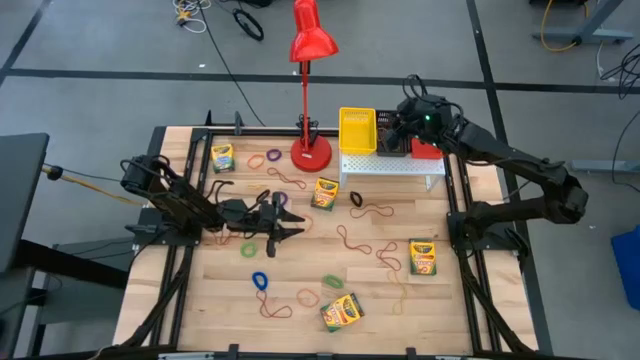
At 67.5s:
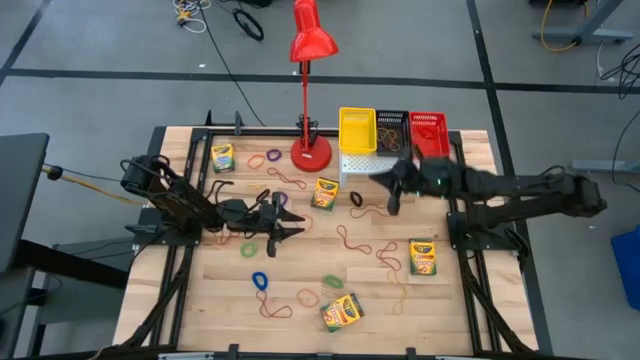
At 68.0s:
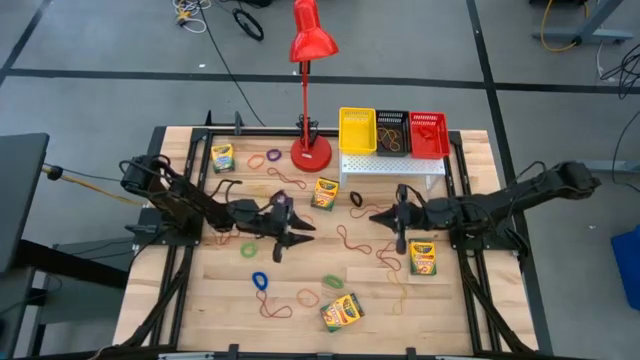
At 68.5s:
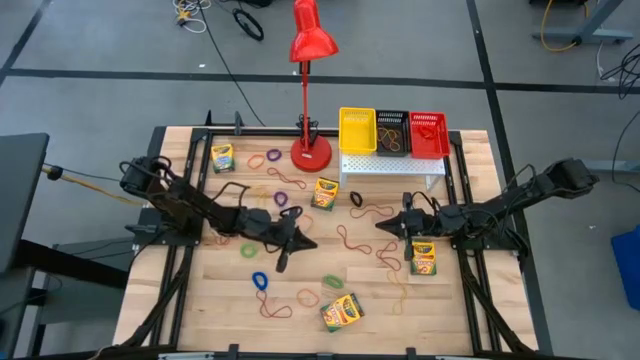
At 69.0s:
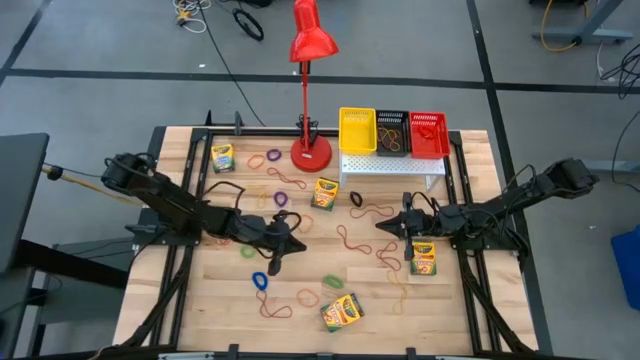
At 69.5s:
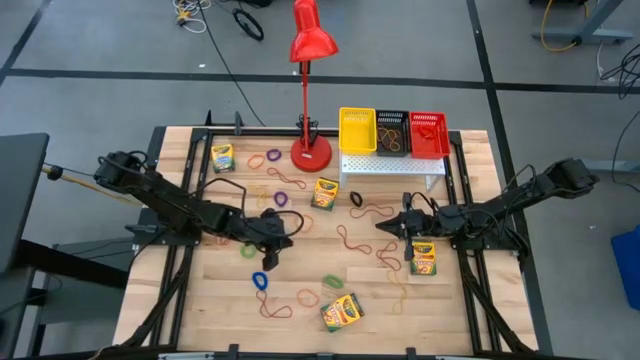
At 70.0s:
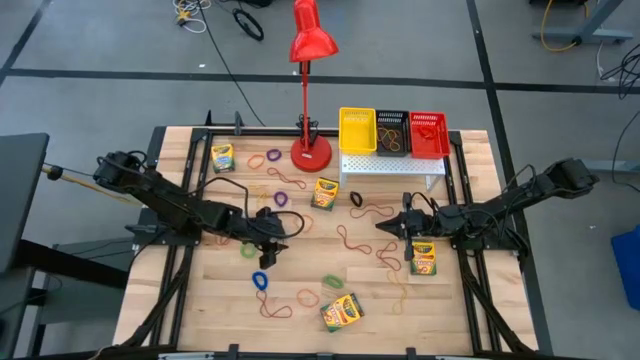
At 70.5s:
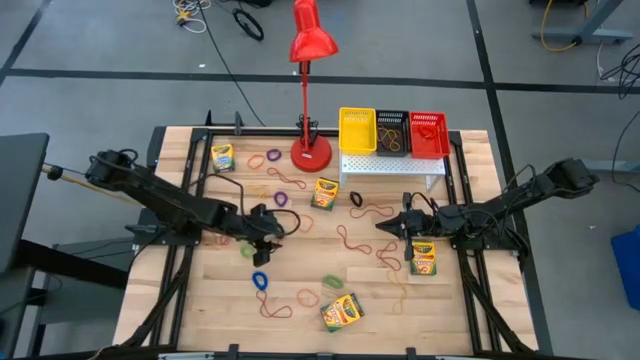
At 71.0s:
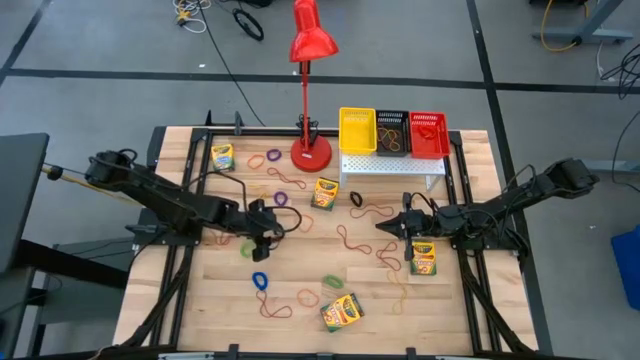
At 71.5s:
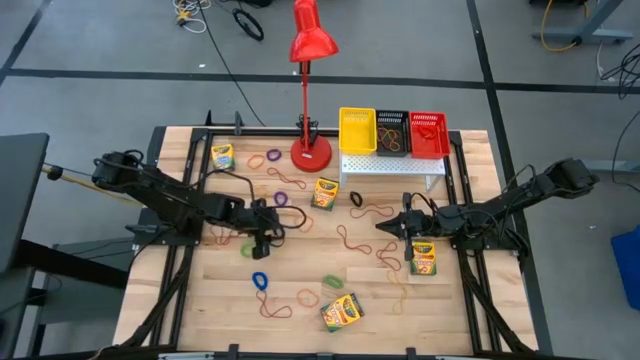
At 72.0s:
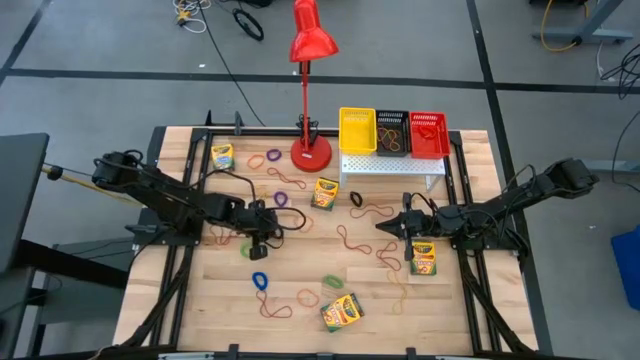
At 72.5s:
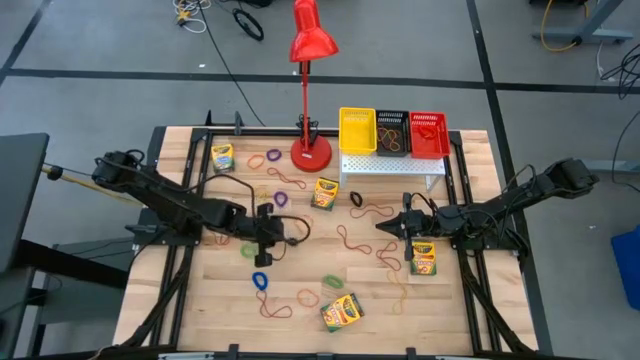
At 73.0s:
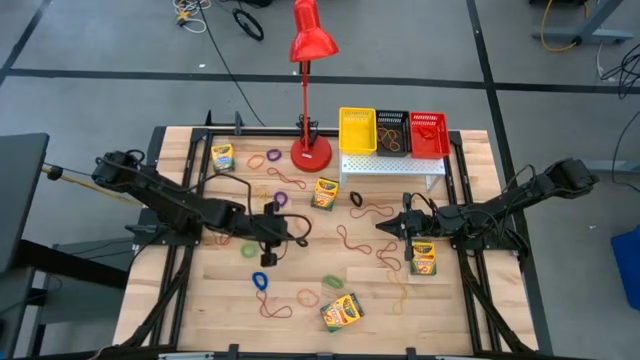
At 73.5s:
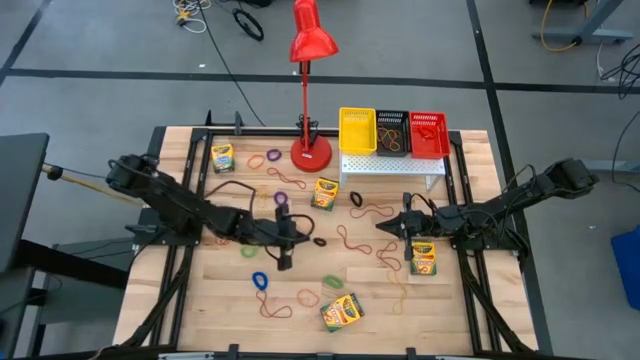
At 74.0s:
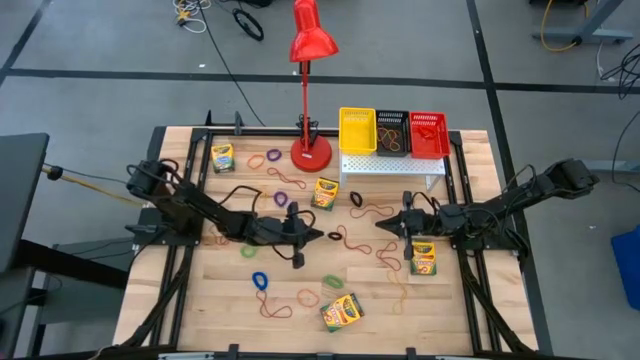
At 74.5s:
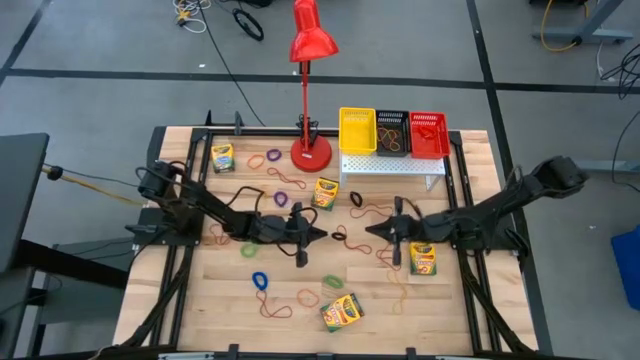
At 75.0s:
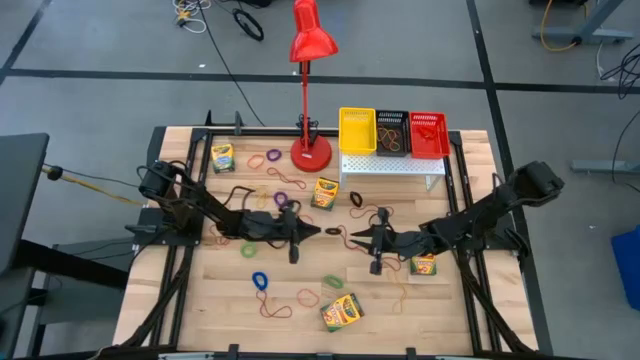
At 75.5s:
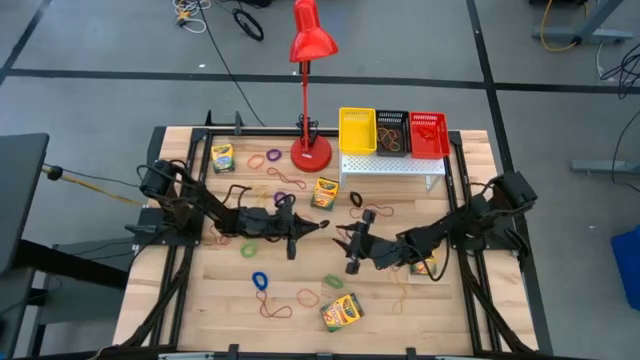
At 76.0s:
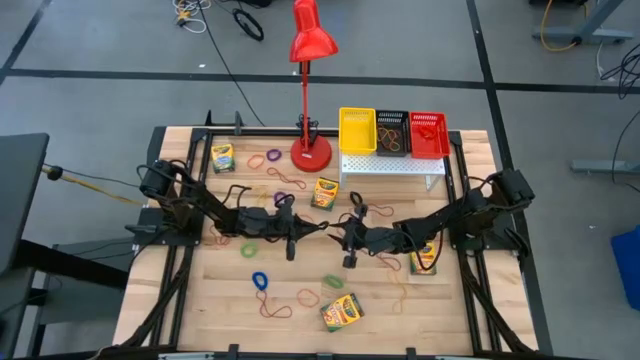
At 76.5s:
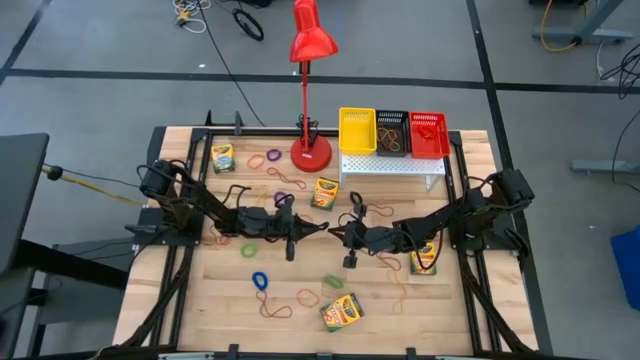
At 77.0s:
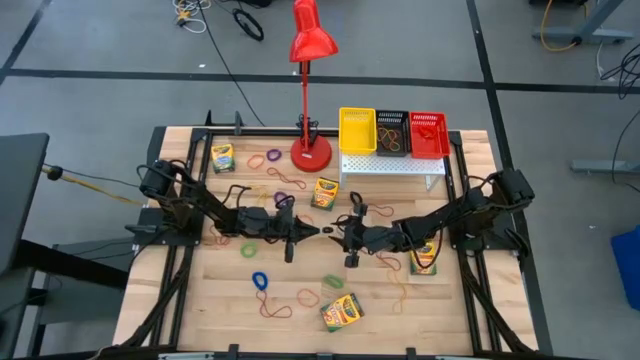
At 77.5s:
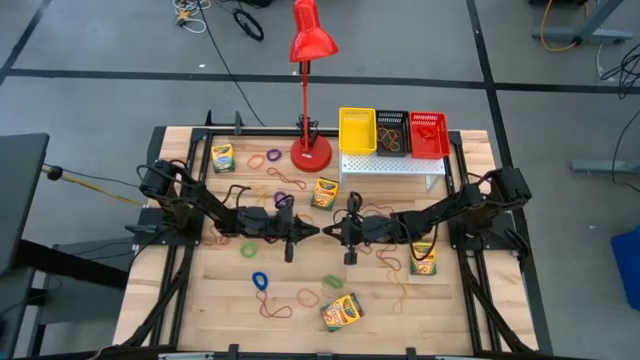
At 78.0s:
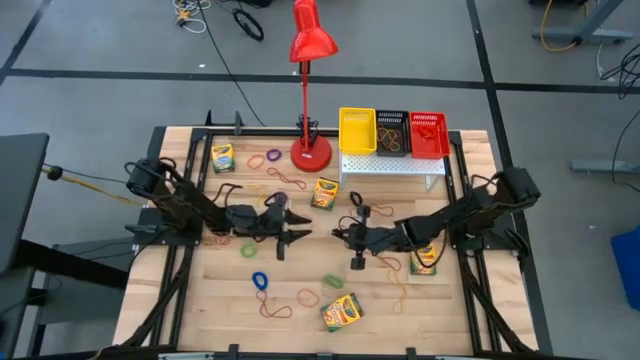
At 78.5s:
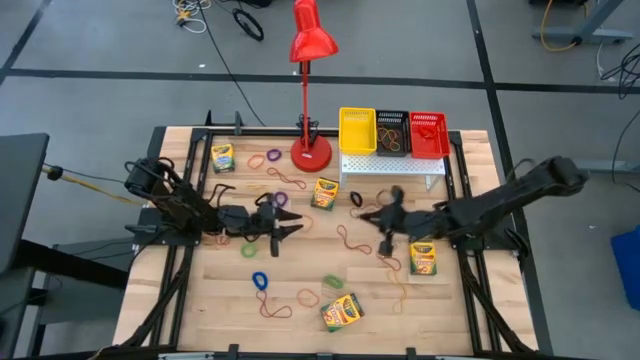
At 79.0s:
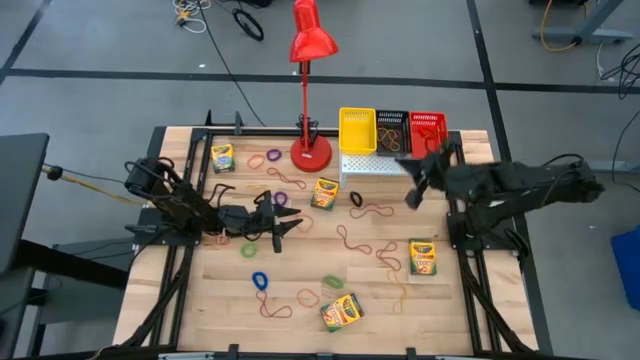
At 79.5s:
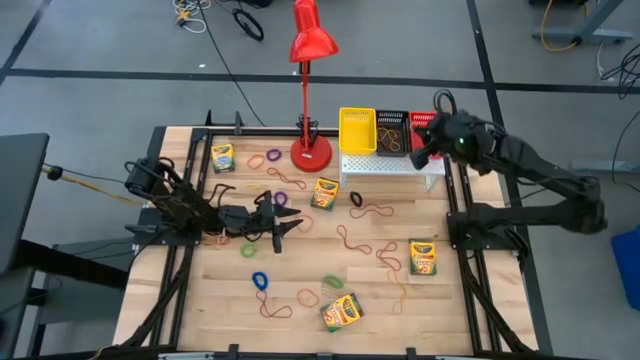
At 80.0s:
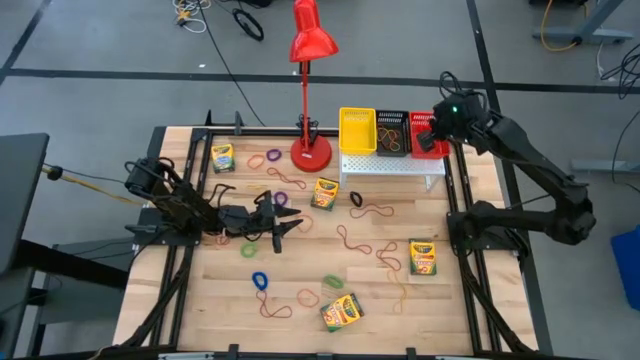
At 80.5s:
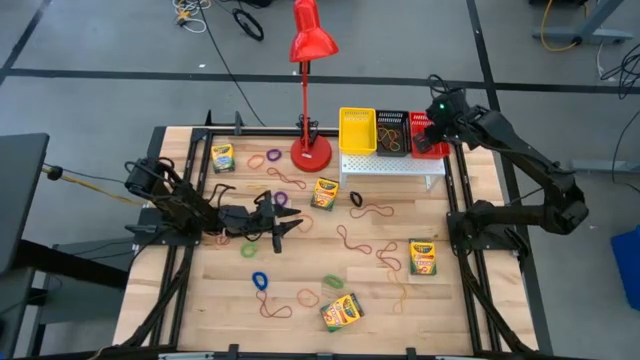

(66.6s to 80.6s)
Task: Pick & Place Office Desk Supplies
Put the black spring keychain into the red bin on the shelf

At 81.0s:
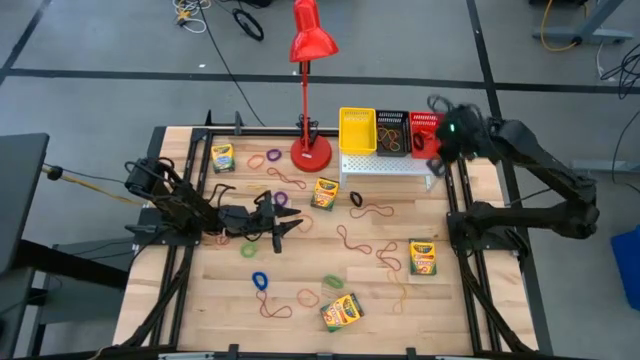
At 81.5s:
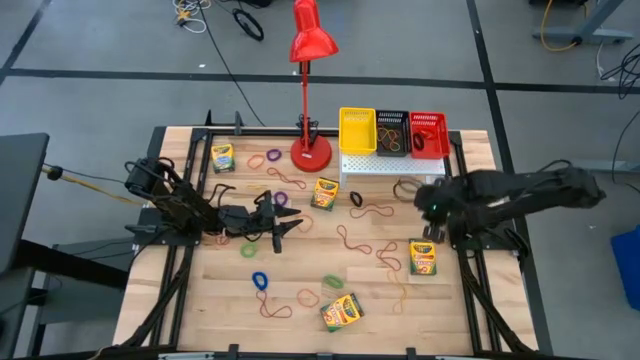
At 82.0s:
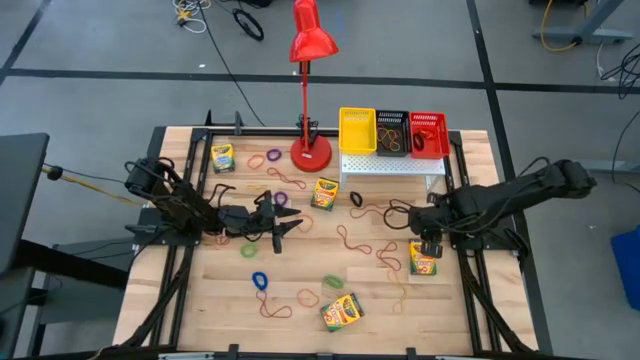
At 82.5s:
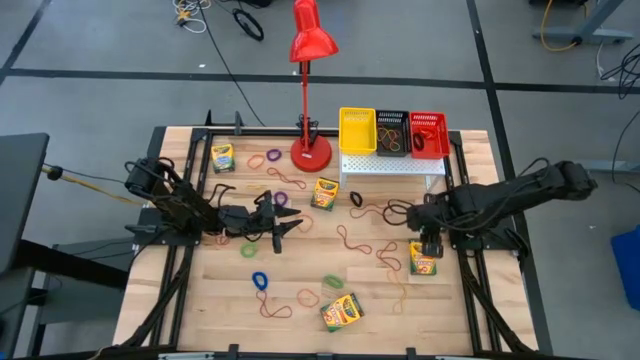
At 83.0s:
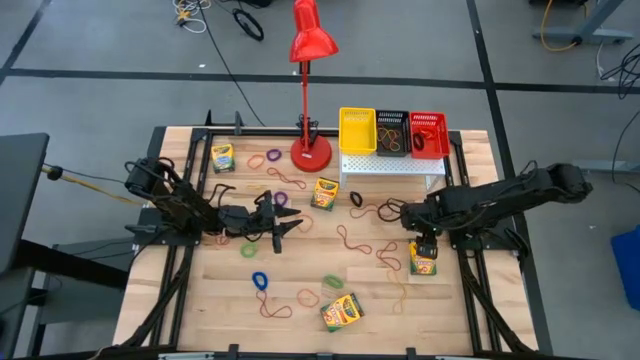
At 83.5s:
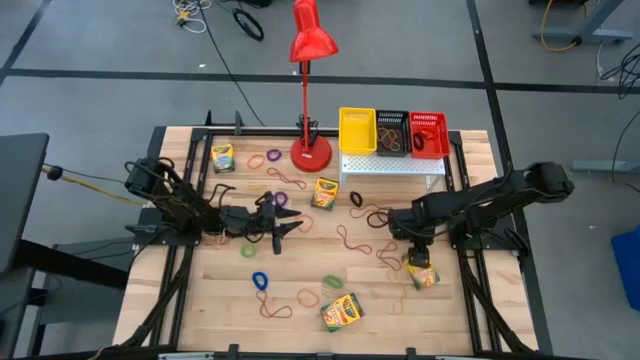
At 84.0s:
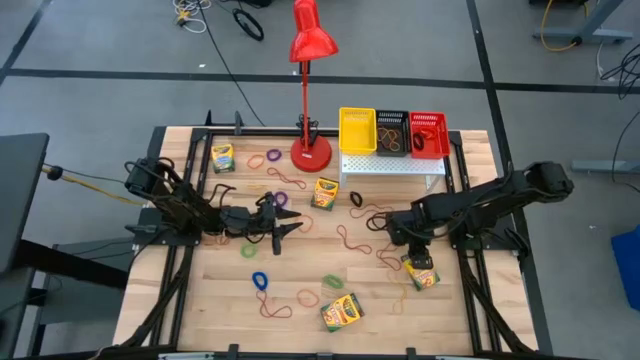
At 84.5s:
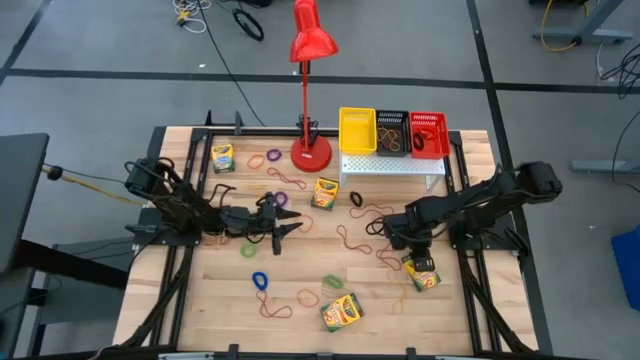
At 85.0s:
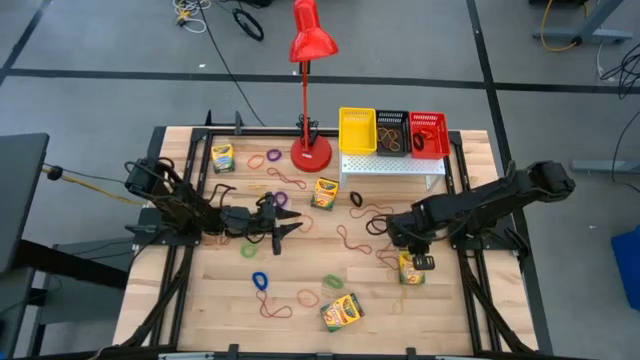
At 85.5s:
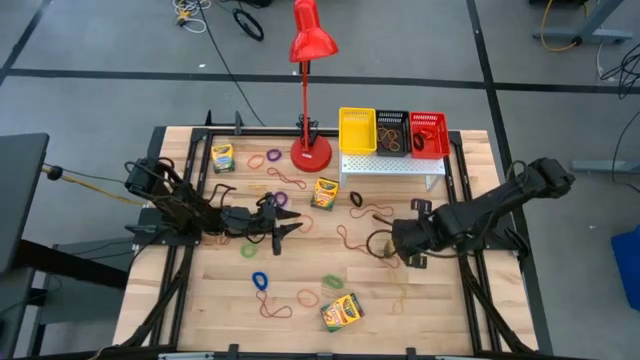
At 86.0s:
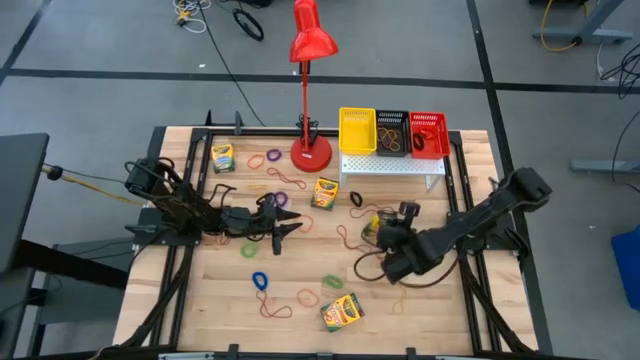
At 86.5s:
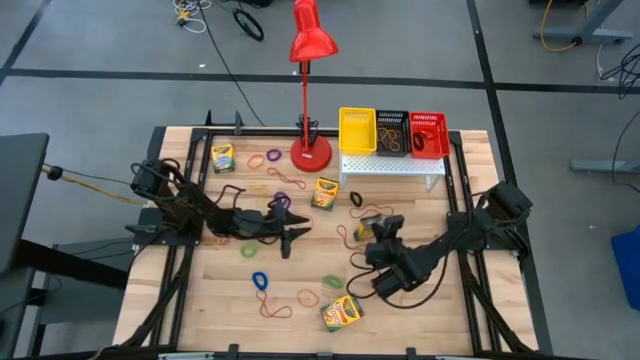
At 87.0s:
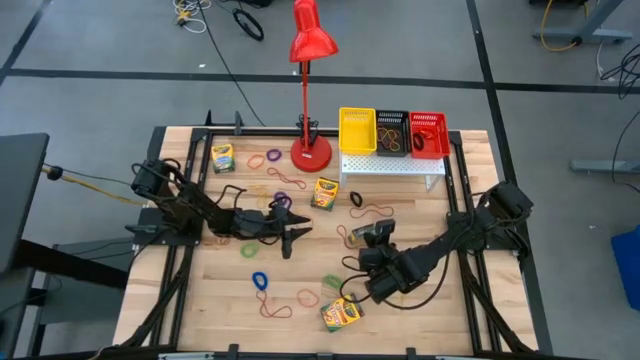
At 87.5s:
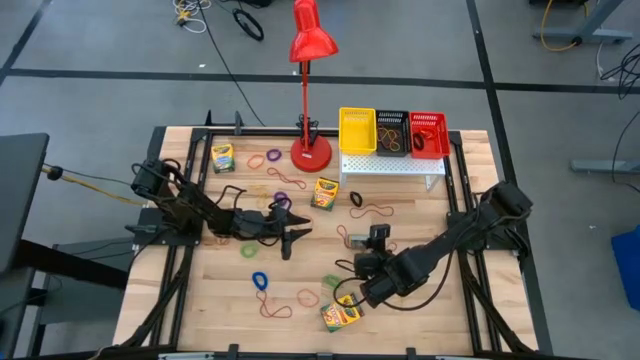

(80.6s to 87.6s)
Put the crayon box into the yellow bin on the shelf

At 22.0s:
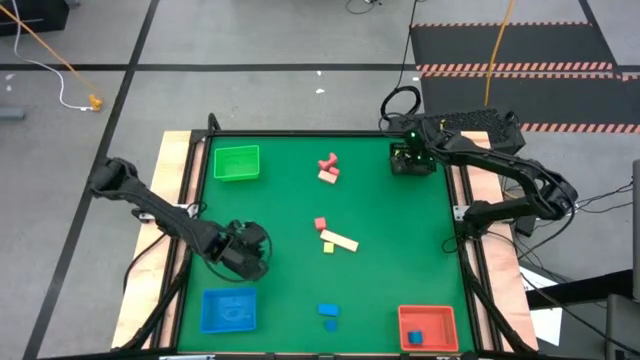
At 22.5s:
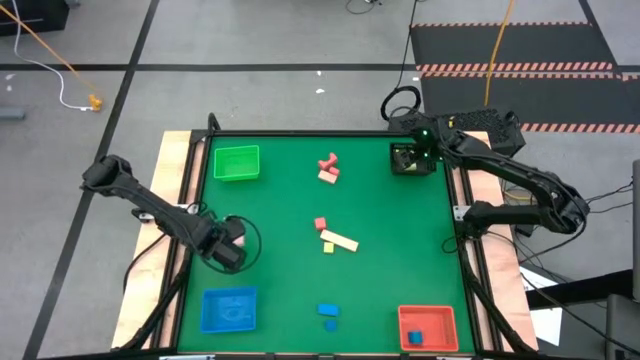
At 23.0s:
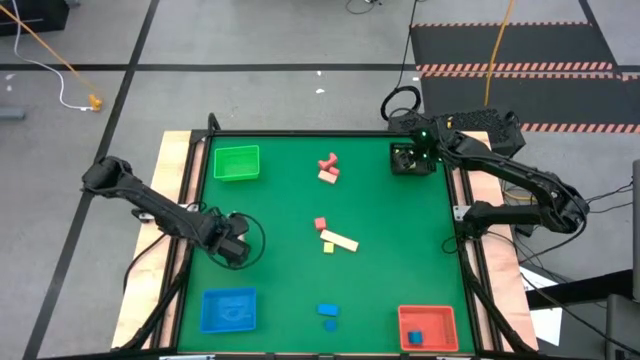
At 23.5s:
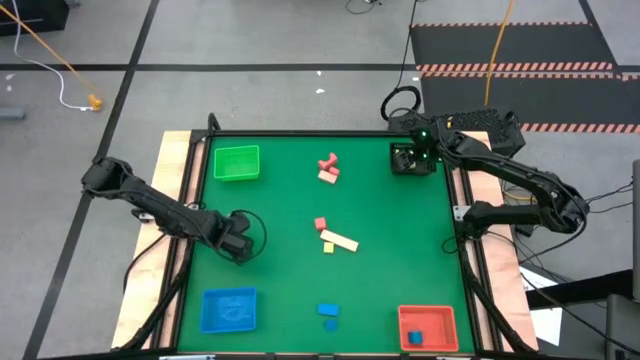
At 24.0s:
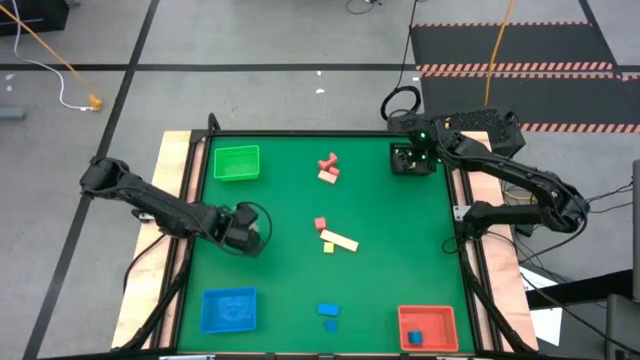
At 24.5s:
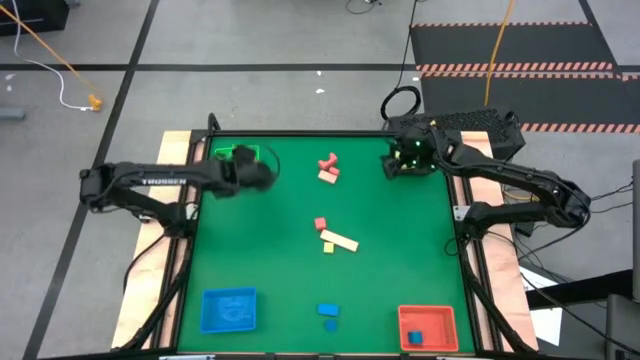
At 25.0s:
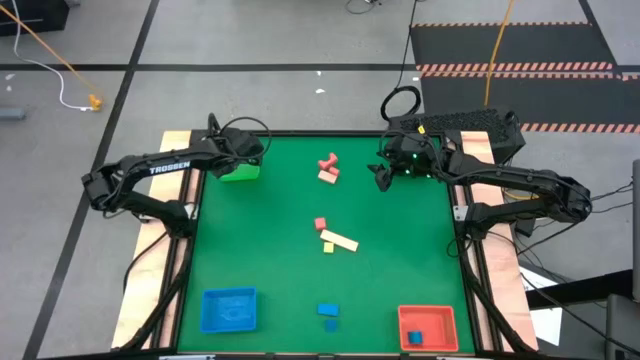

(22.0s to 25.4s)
Task: Sort & place blocks by color
Put the bottom left light orange block into the green bin
